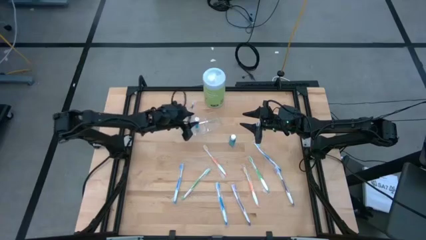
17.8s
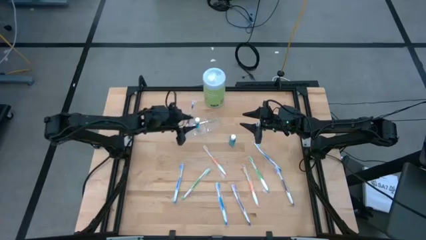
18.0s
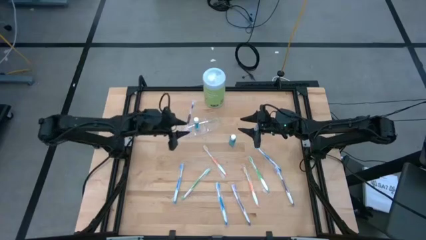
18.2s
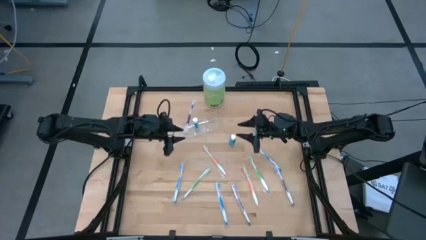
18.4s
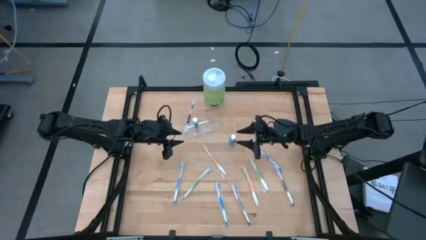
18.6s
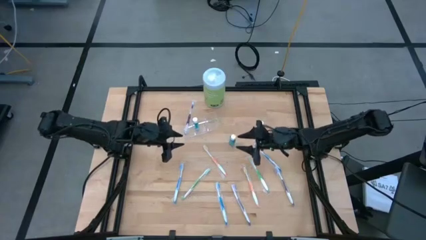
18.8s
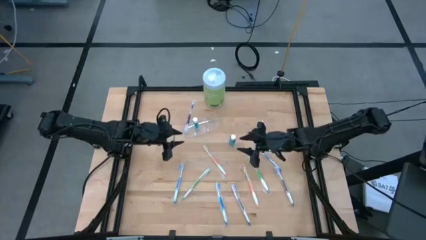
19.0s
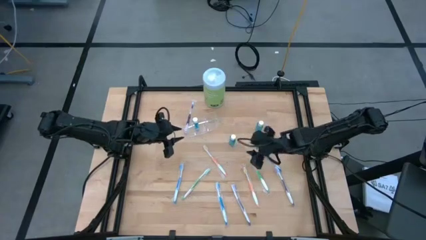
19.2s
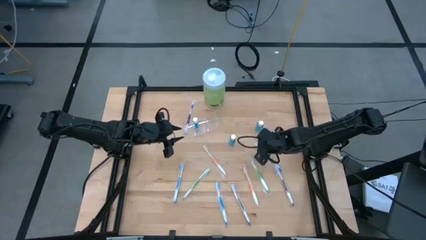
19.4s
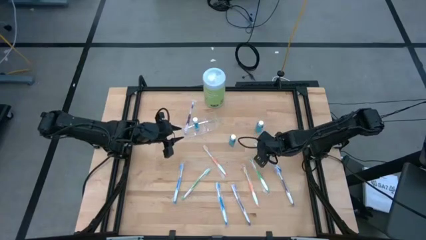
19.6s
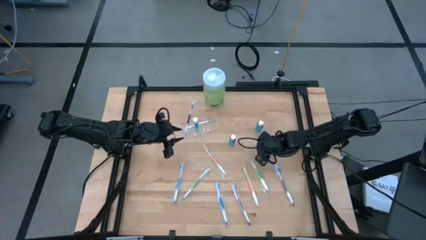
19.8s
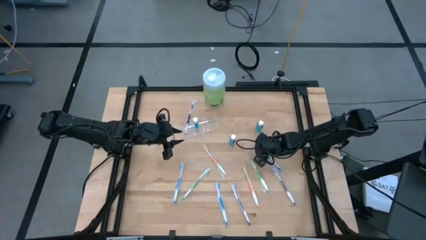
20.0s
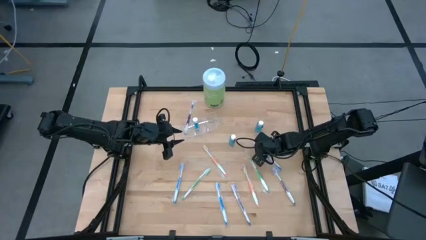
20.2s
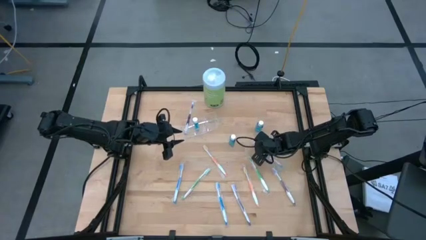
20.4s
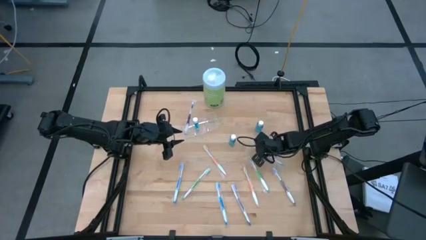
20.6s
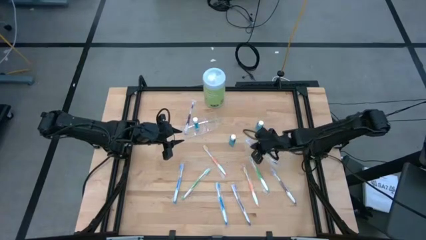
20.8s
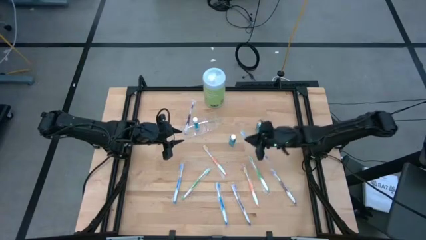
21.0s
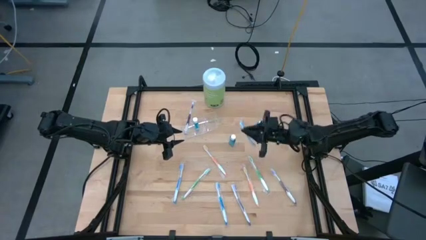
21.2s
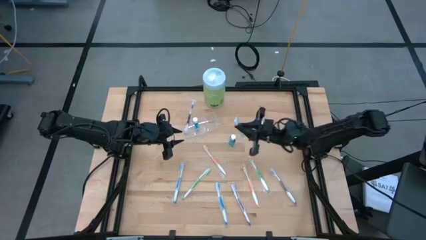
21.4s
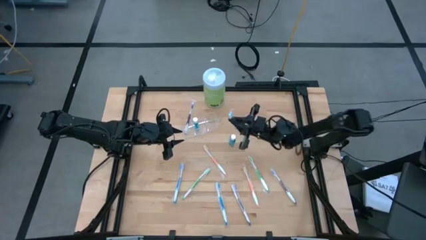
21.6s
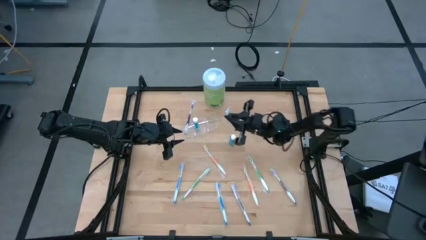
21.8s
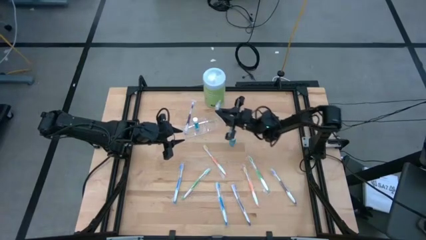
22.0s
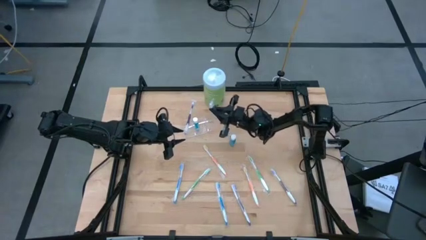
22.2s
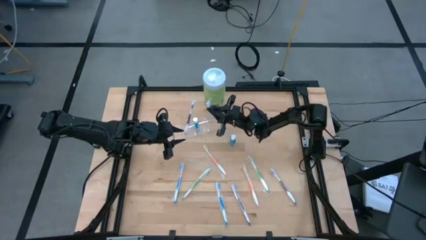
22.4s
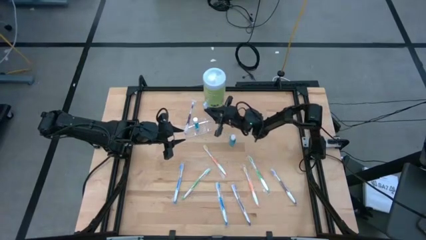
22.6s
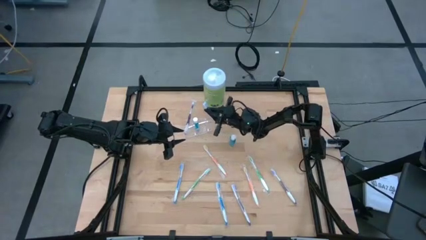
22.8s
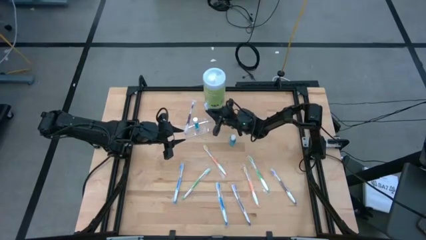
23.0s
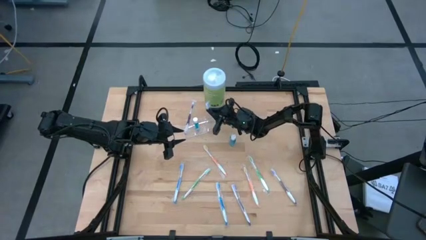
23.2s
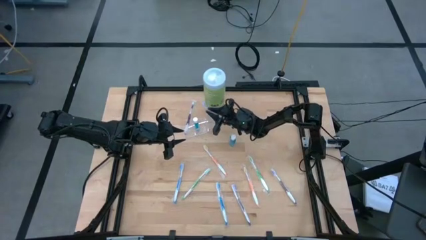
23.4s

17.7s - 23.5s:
Task: Pick & Place toothbrushing station
Put the top blue toothbrush into the transparent organizer

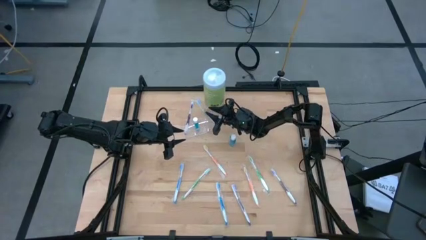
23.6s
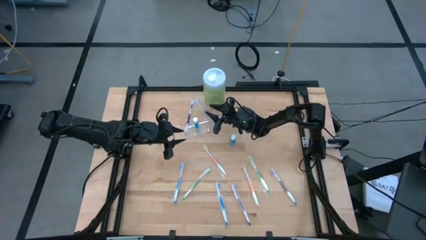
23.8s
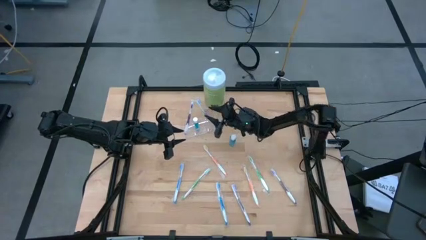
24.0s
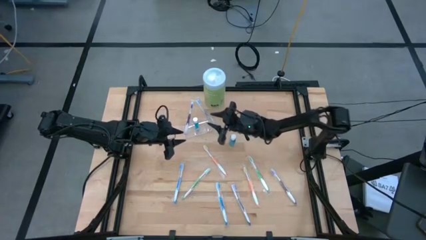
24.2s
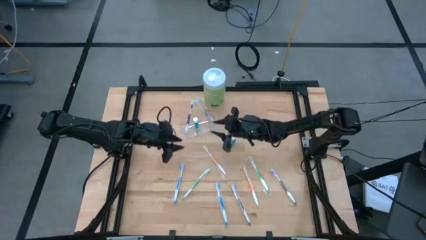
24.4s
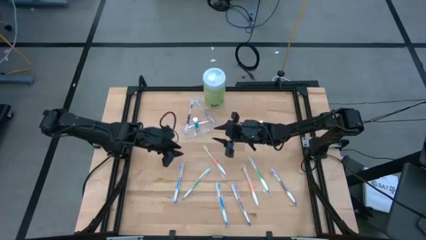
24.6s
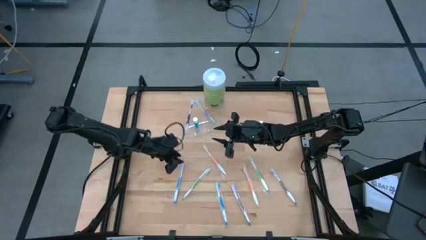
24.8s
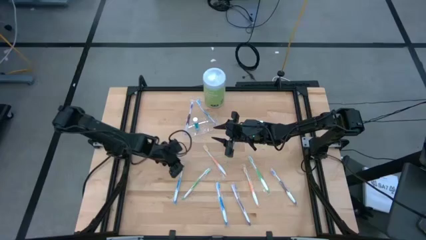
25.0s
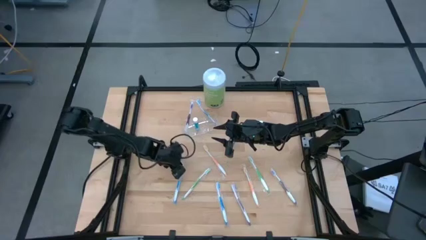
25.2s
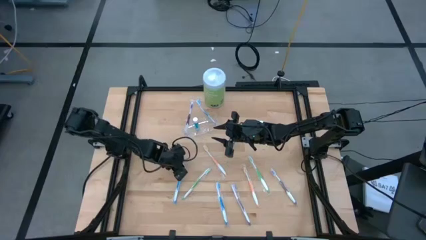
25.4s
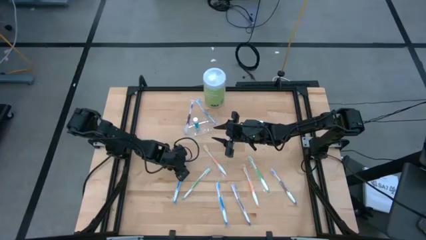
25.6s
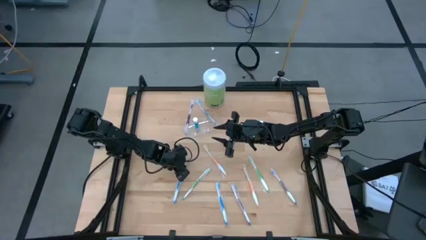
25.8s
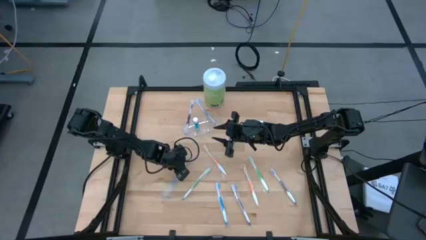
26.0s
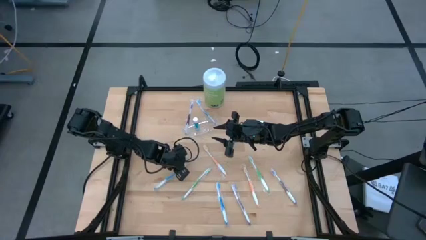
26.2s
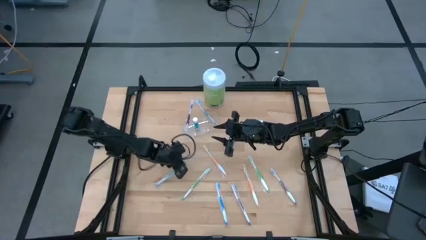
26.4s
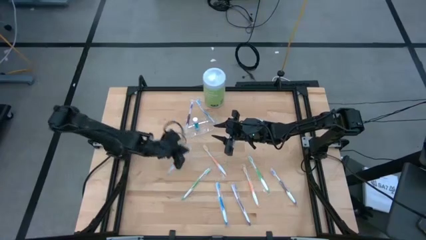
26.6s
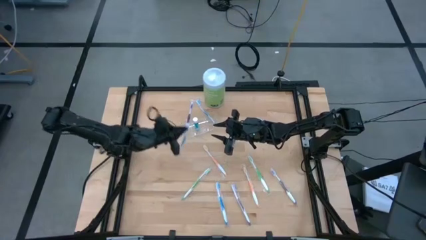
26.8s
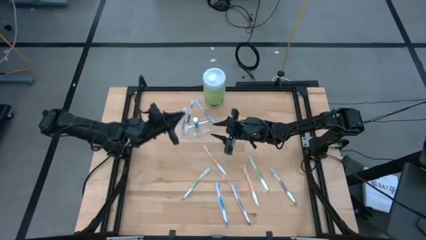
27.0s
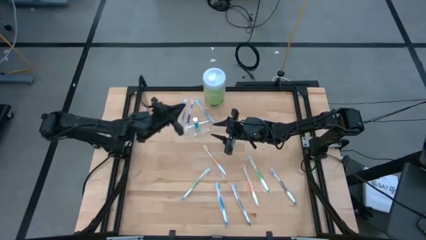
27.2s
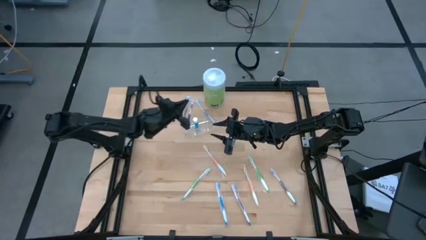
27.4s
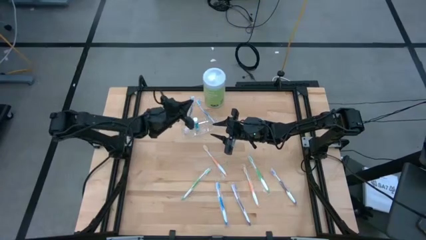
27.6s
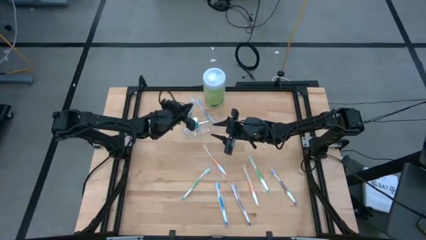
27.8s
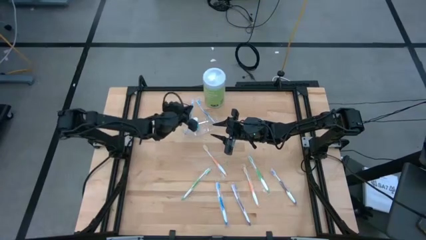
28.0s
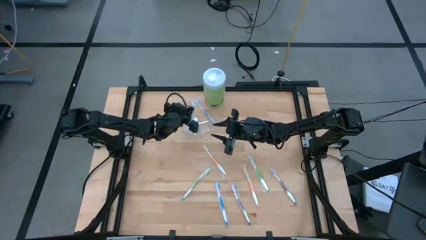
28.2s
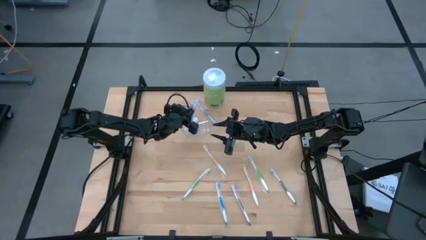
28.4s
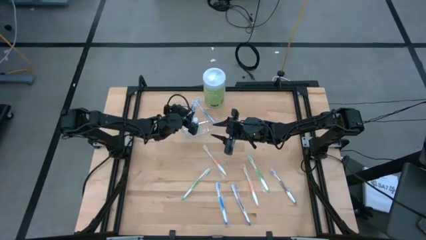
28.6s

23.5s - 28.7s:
Put the top left blue toothbrush into the transparent organizer

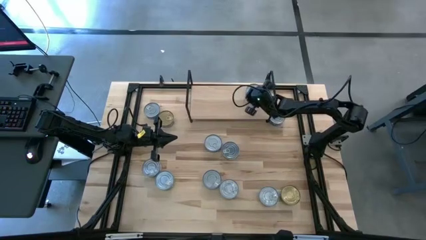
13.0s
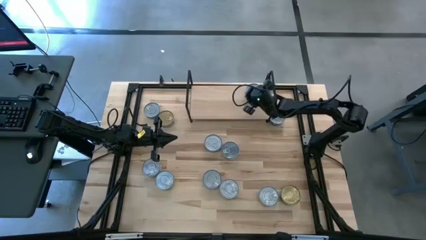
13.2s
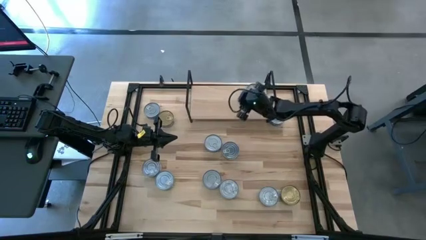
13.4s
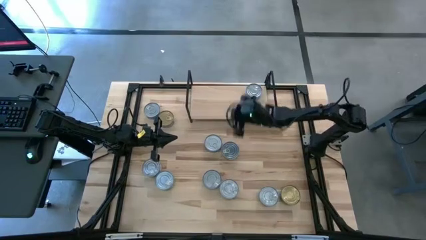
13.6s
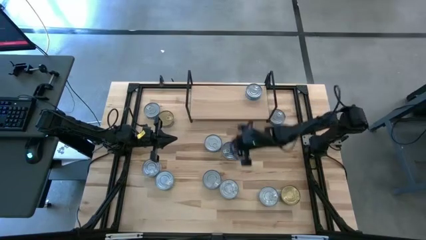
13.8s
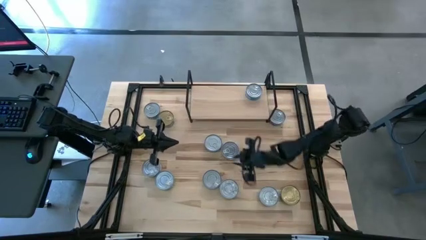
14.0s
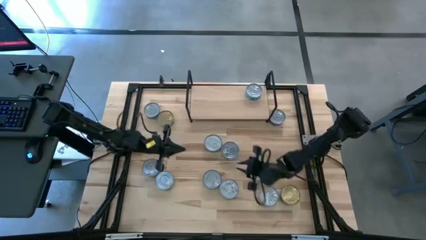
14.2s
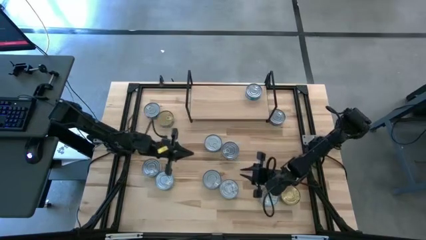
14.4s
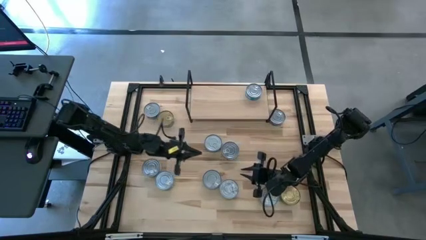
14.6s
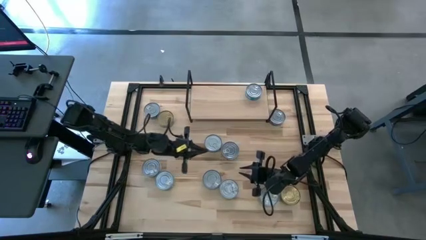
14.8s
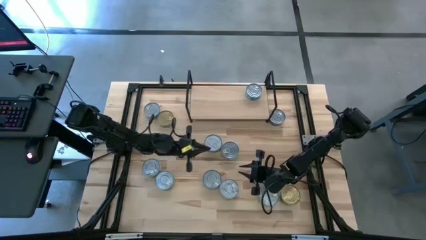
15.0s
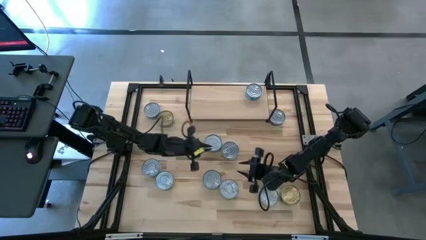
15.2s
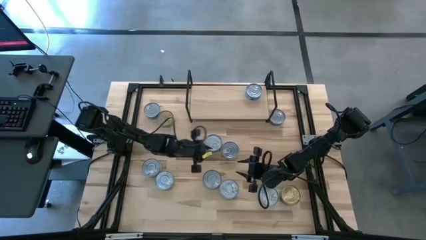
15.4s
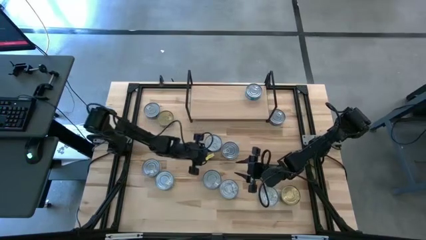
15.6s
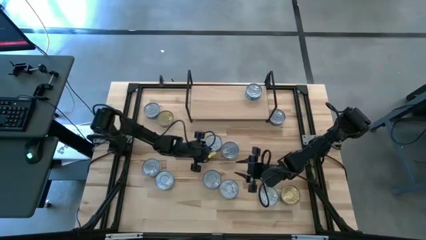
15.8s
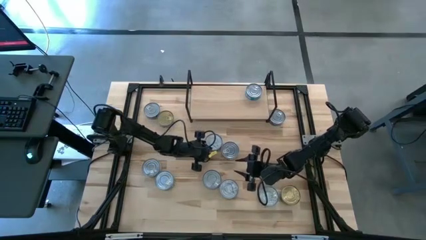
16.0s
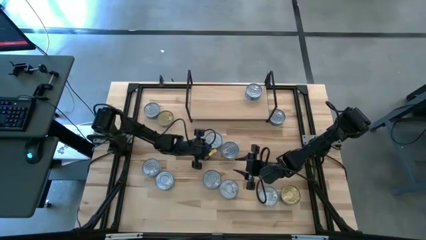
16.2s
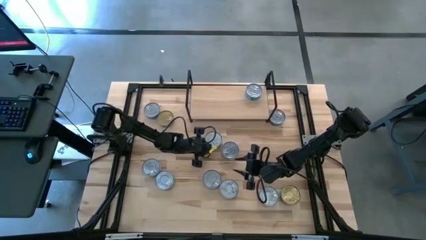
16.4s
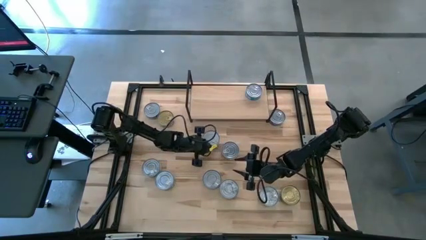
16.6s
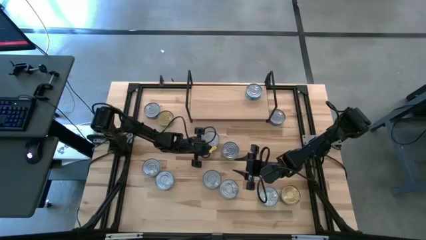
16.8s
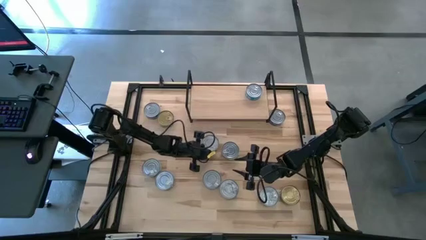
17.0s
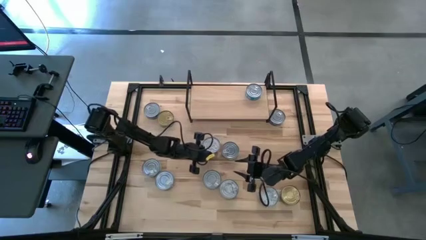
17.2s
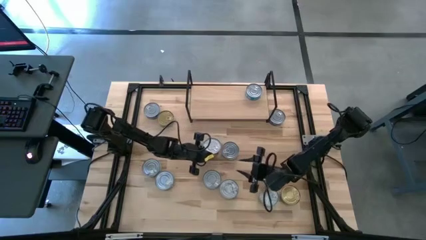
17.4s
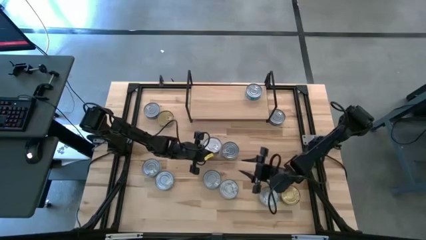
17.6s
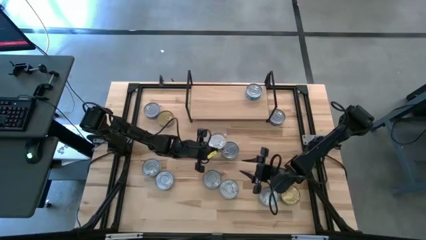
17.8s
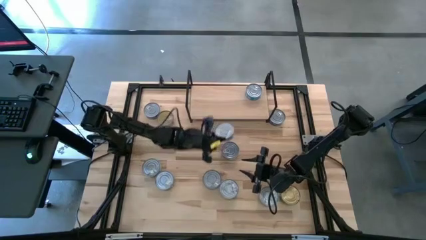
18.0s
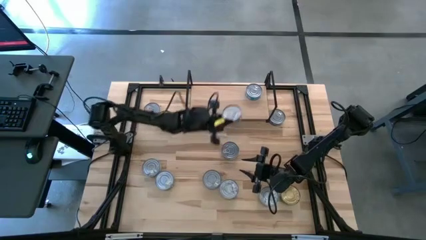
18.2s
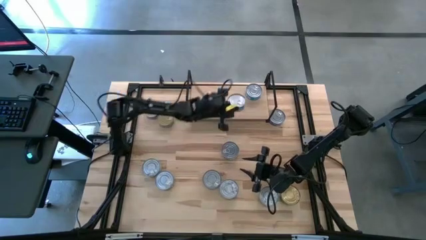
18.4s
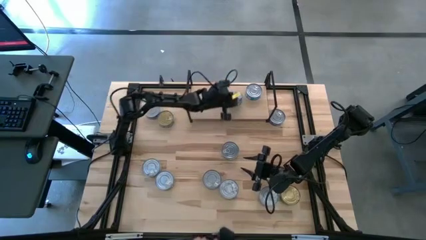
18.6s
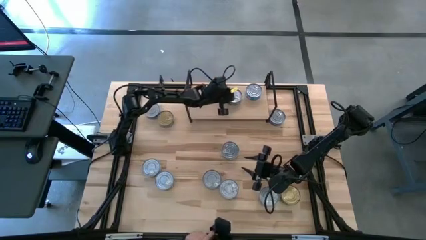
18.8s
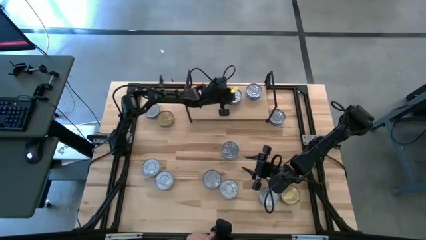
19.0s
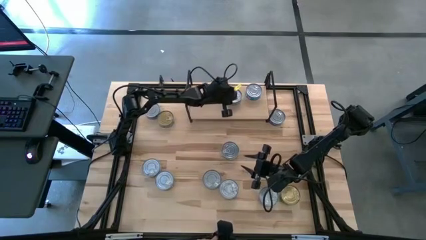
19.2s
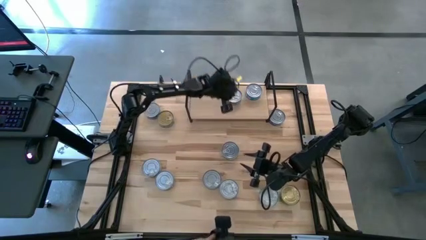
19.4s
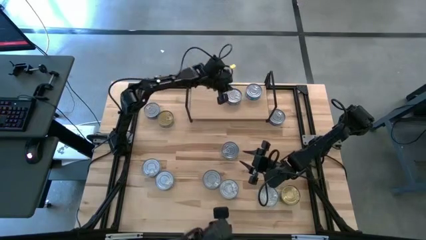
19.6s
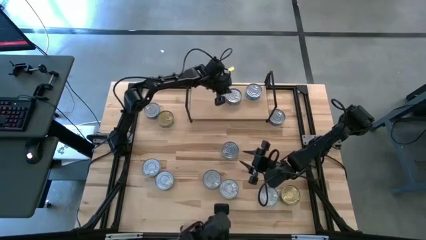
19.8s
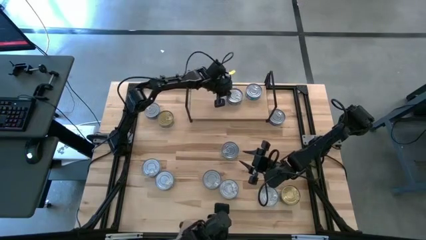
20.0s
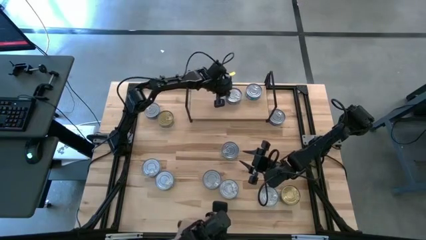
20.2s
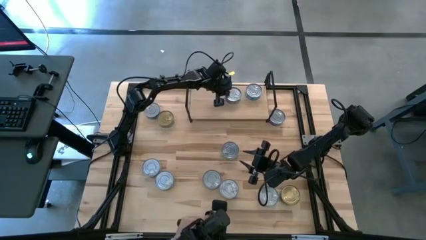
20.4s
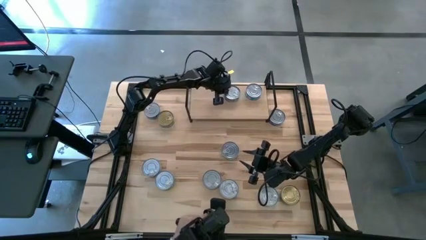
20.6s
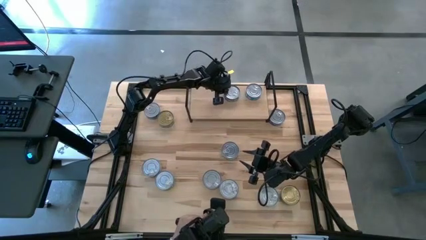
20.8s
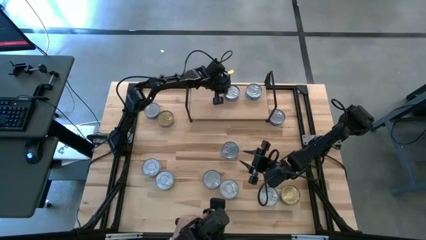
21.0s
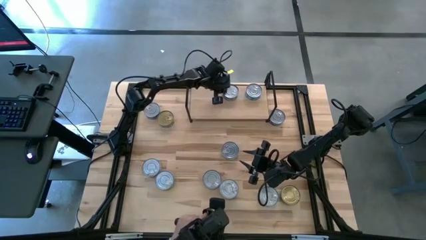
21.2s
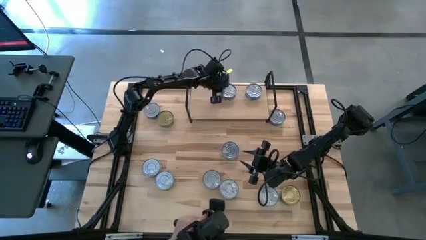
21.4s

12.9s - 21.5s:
Task: Stack canned seafood by type on shelf
Put the blue tuna can on the shelf
